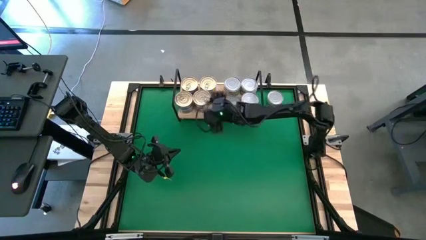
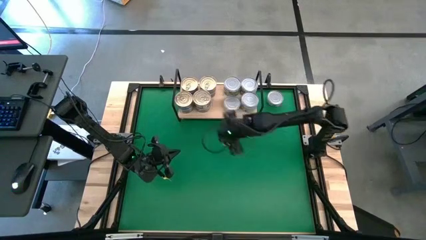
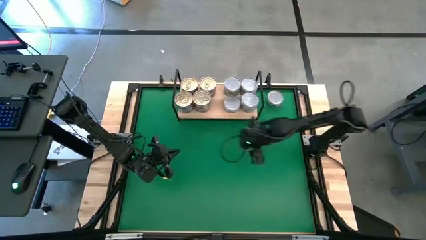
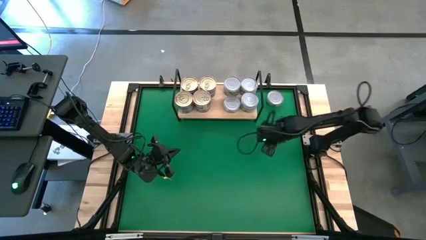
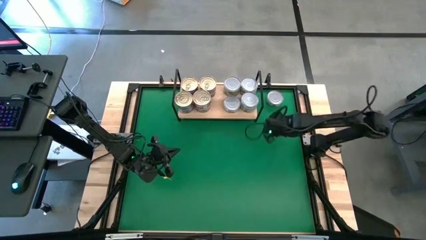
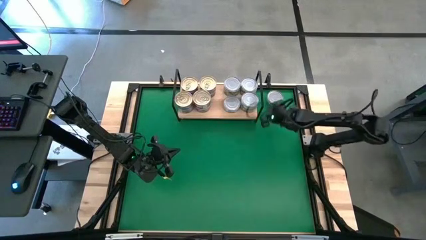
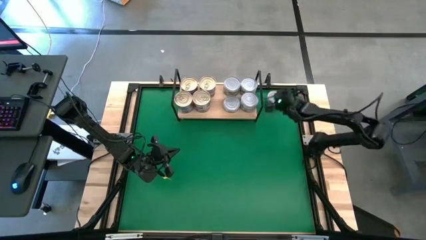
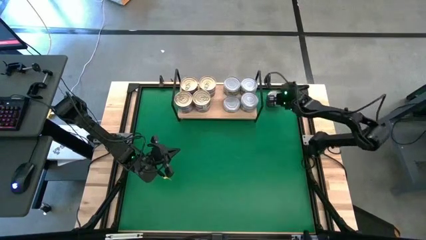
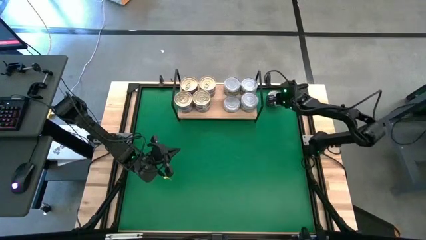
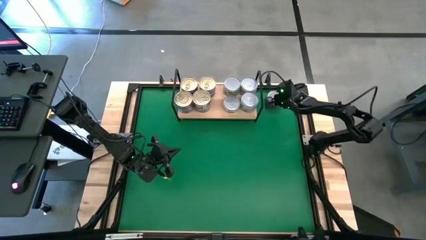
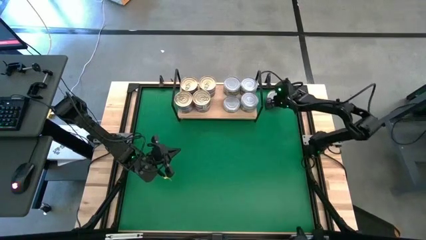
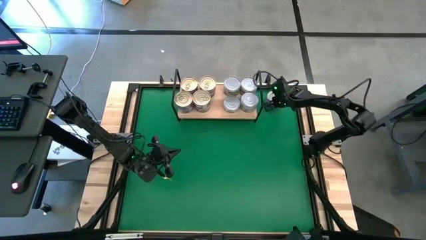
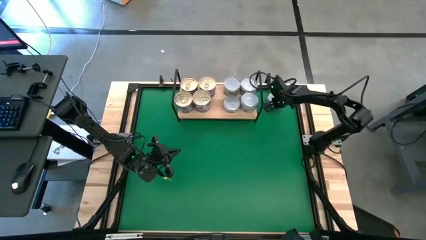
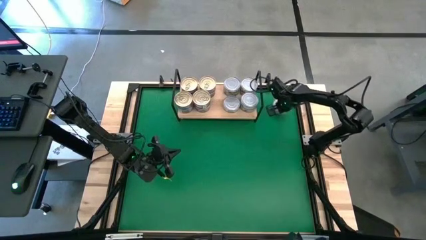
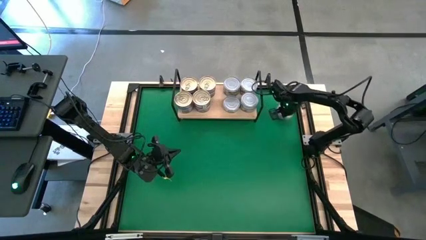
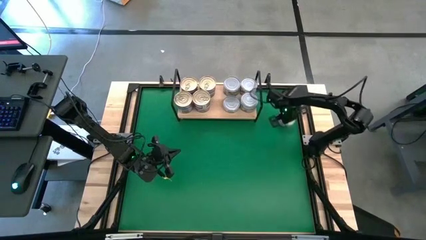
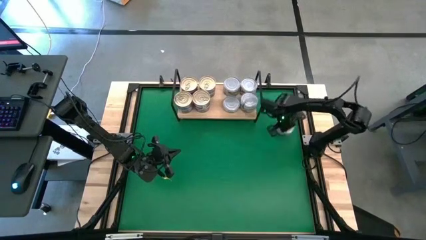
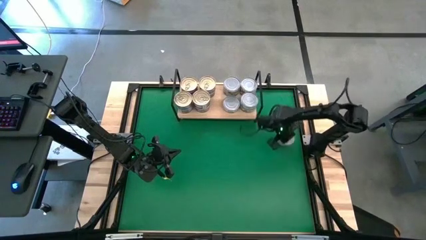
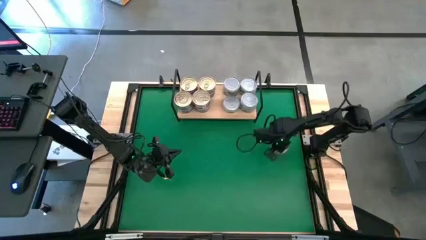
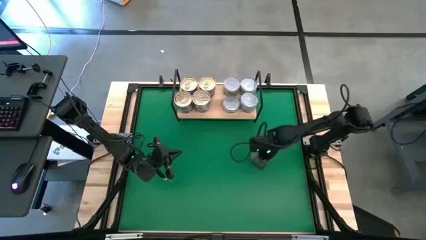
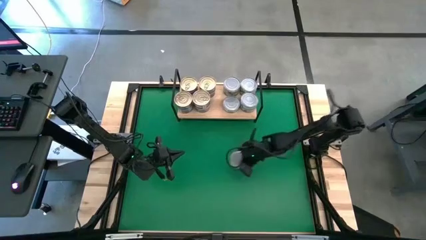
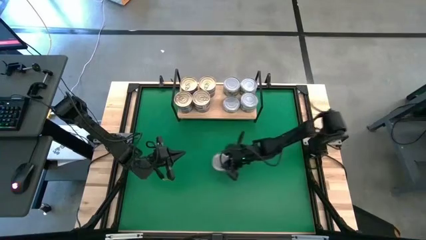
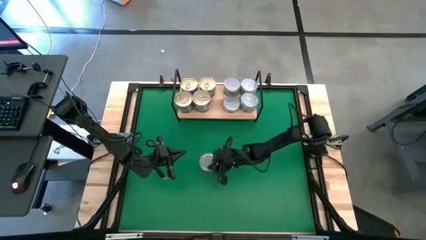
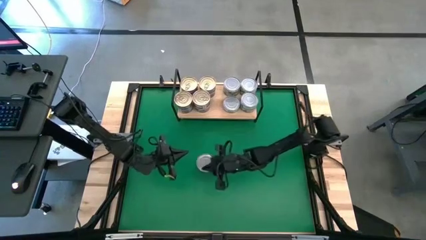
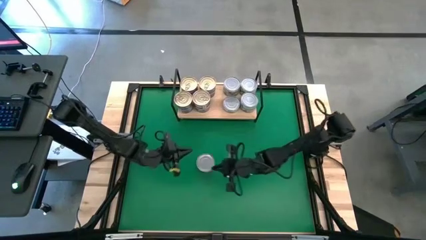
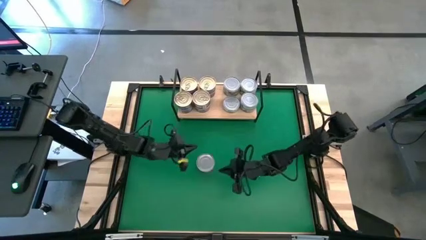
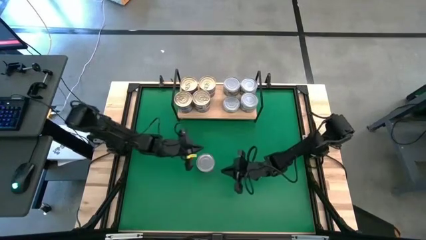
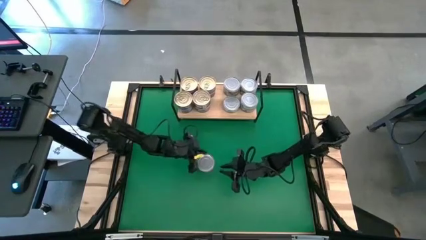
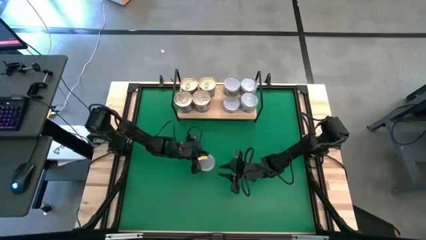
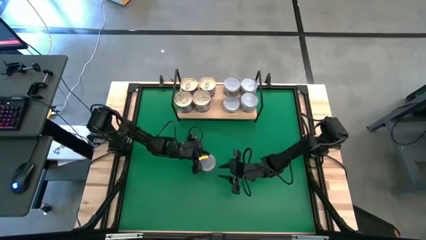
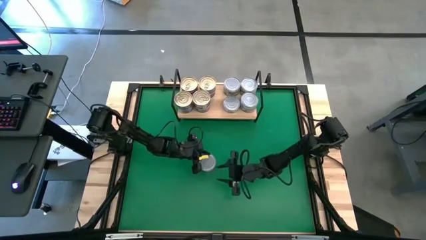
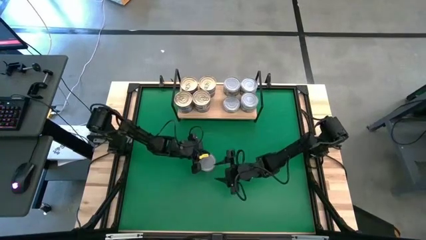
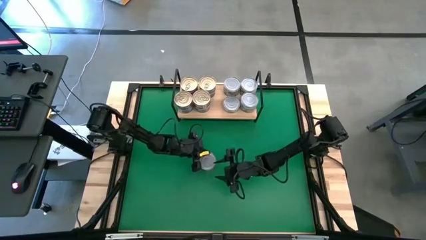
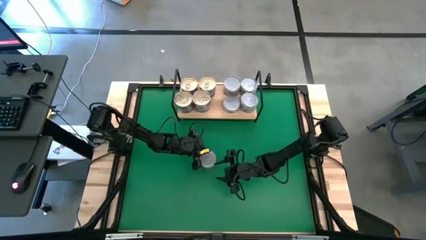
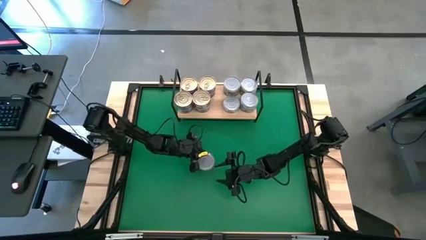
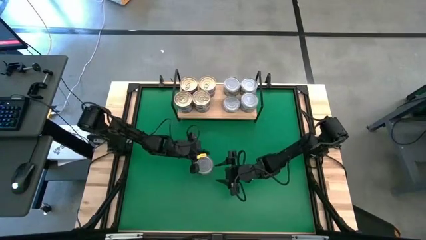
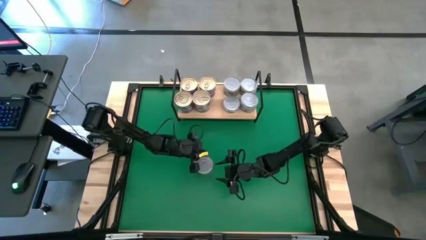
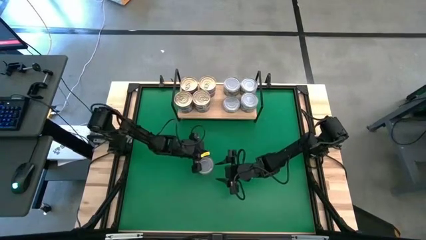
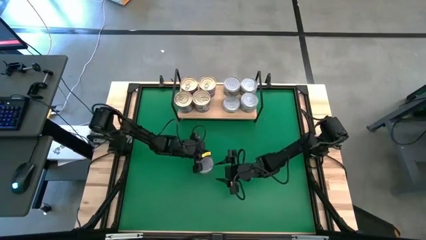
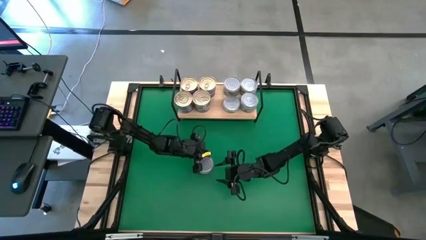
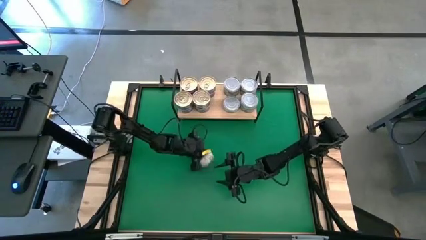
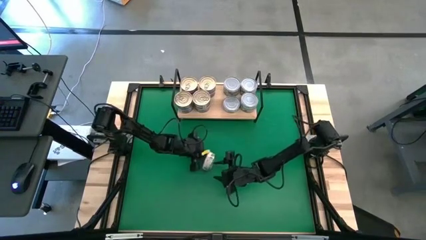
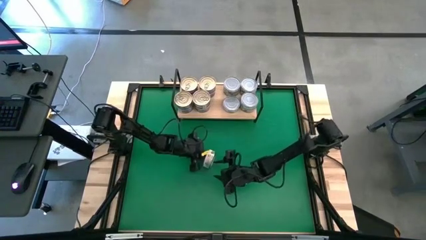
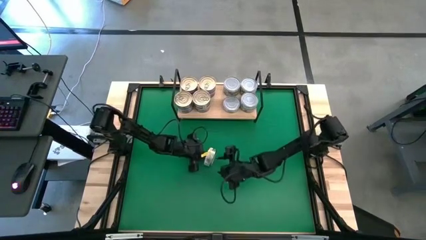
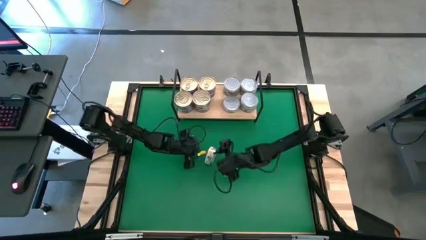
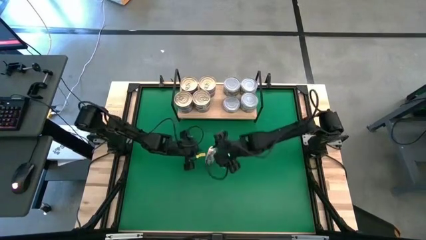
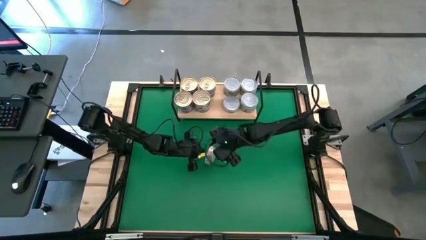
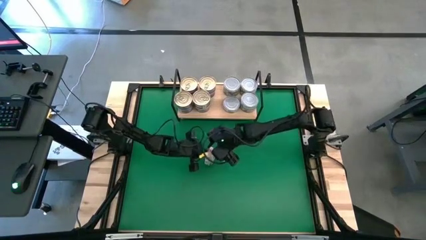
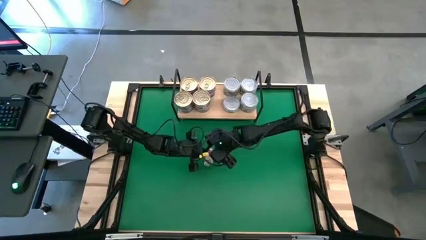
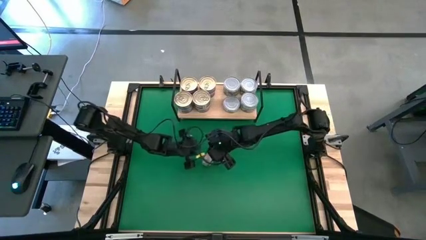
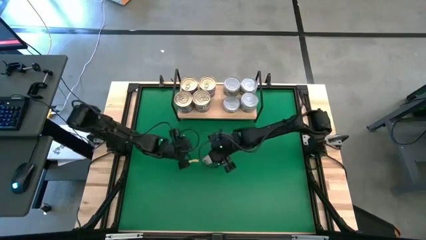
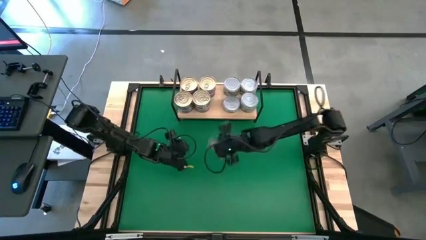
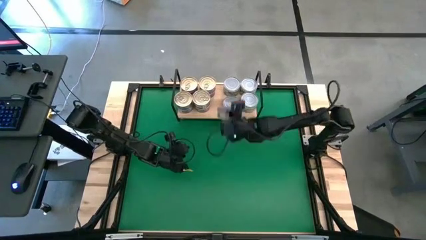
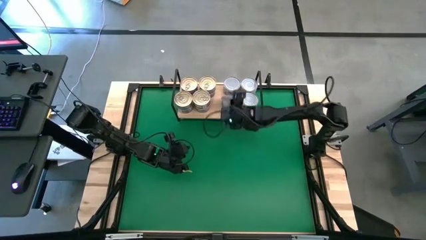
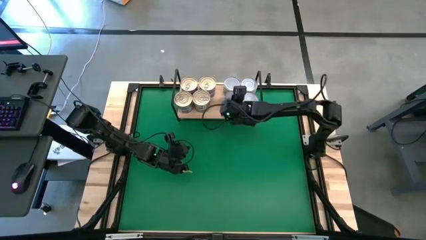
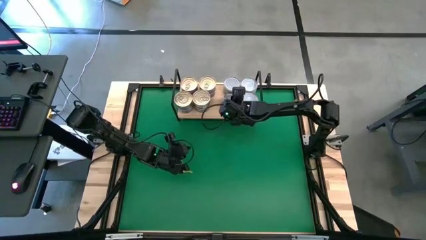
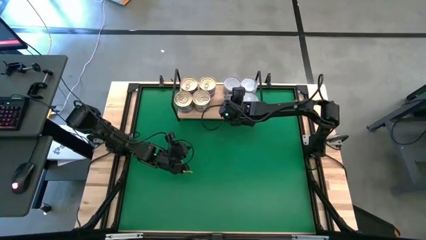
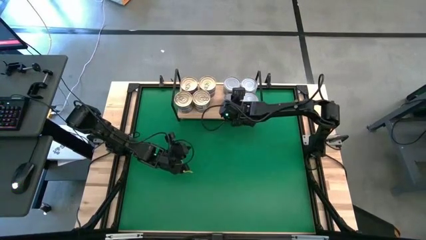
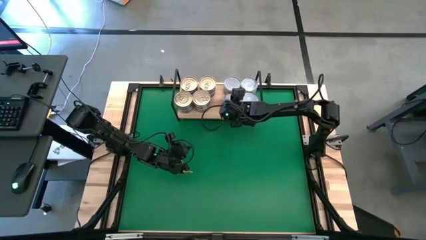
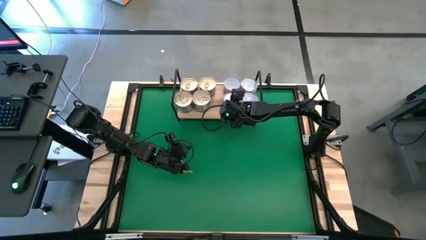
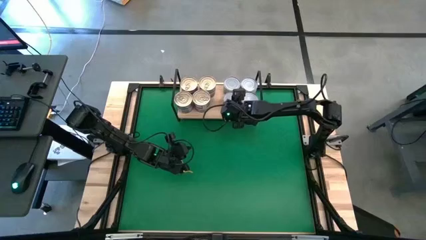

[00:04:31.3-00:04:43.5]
Task: Stack canned seafood by type on shelf
Stack the green white tuna can on top of the other green white tuna can on the shelf

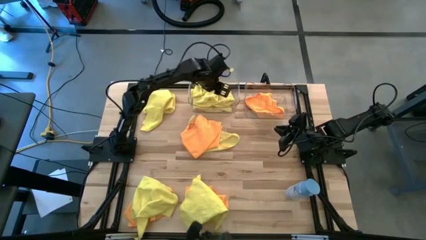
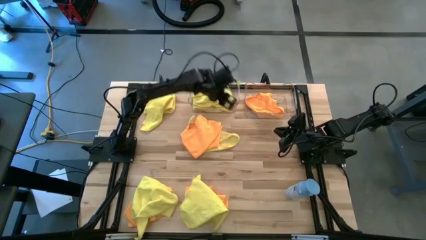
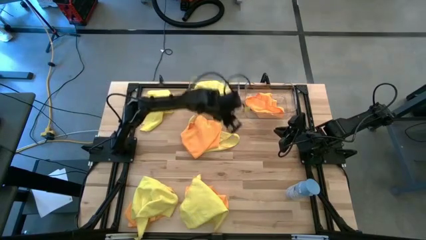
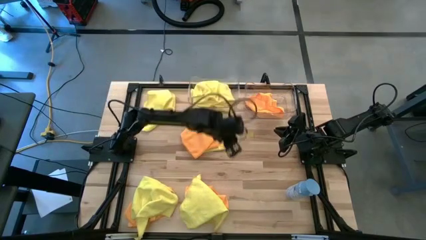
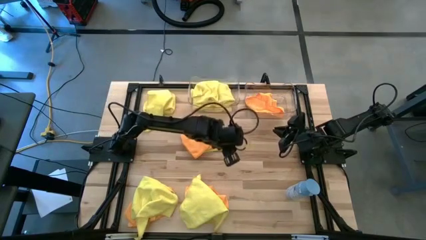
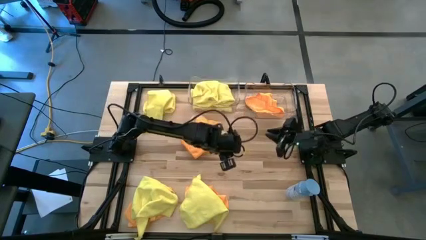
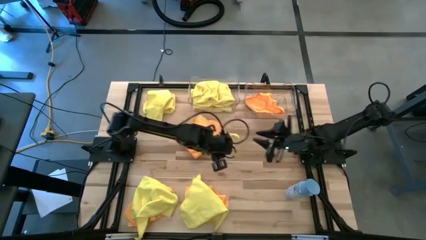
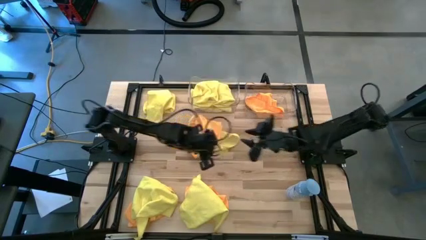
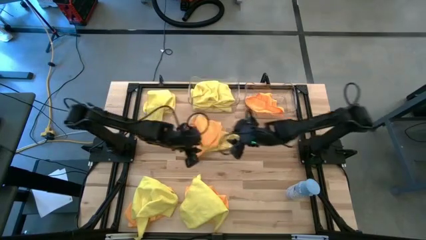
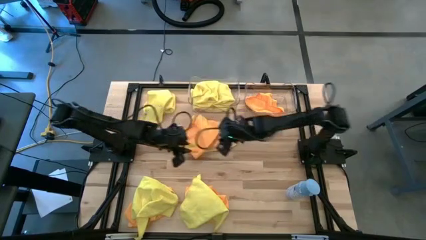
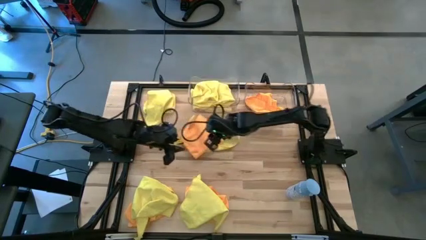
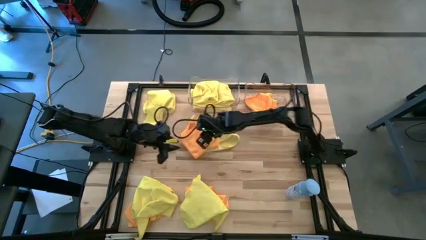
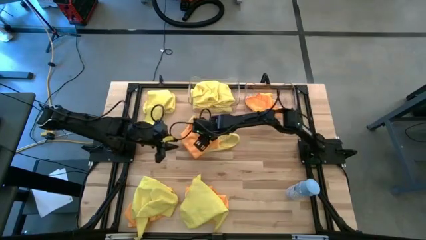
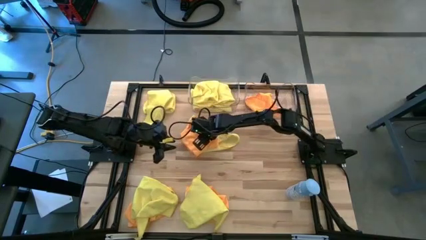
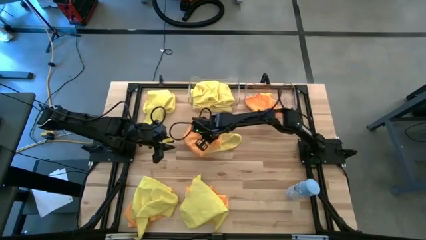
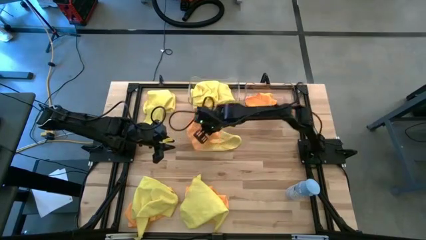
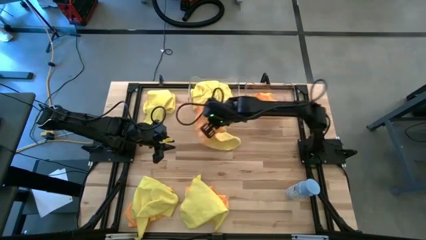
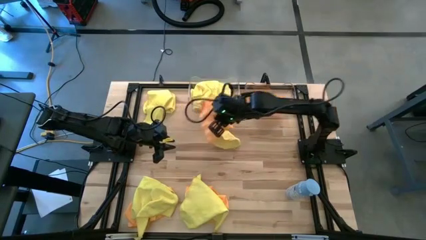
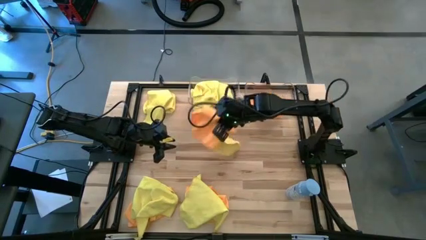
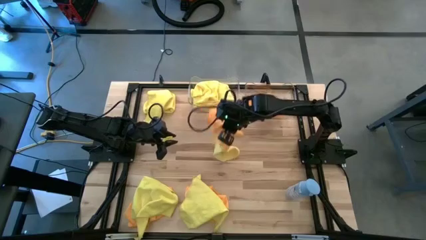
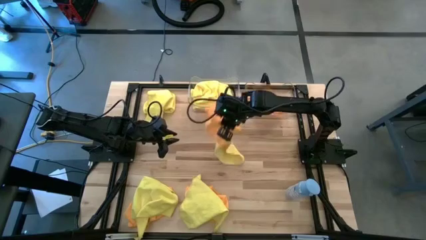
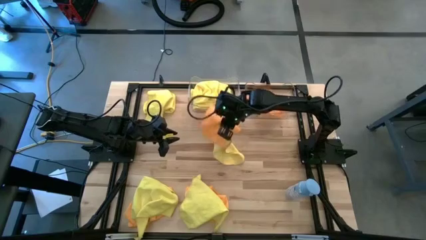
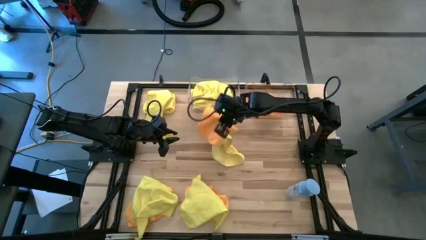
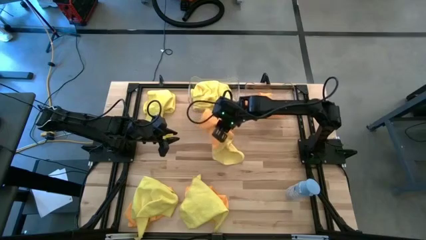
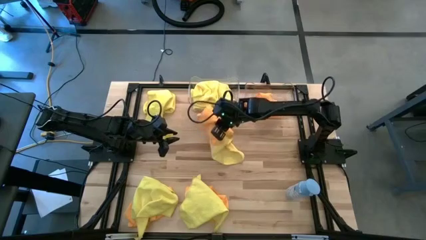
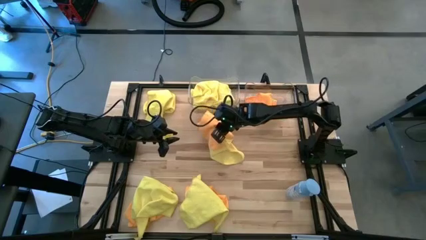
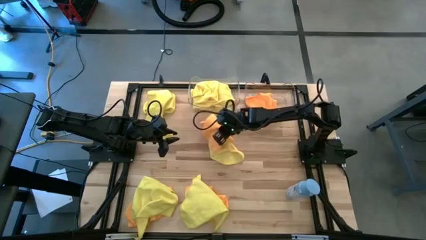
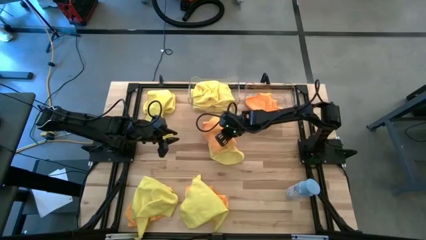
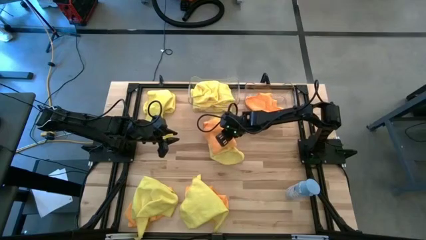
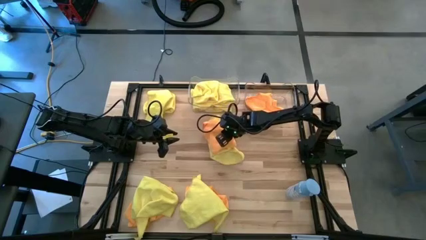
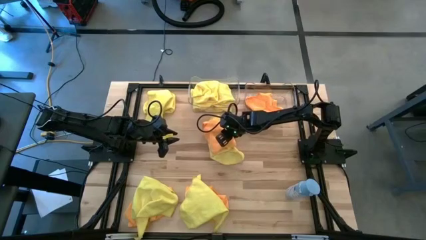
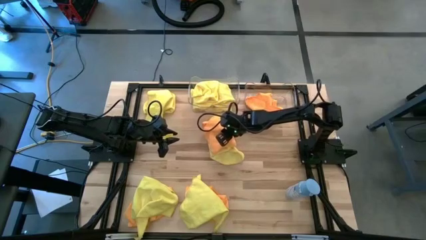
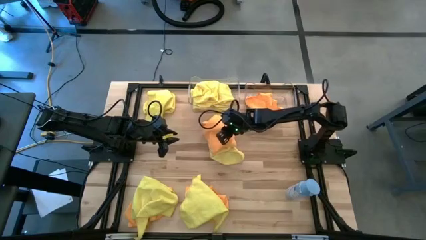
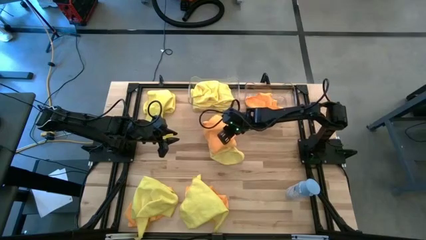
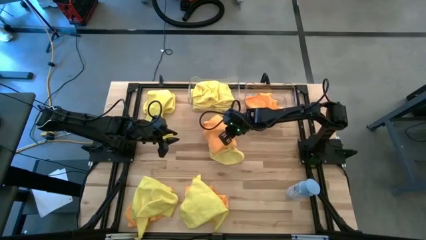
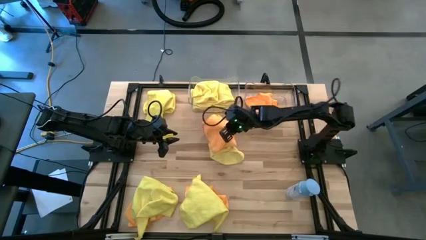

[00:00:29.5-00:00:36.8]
Task: Sort microfiber towel by color & place in baskets
Put the orange microfiber cloth into the right transparent bin
